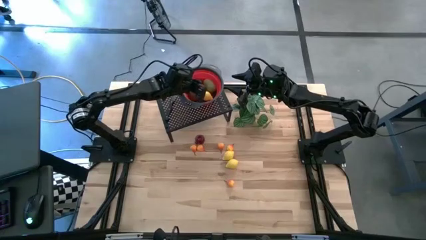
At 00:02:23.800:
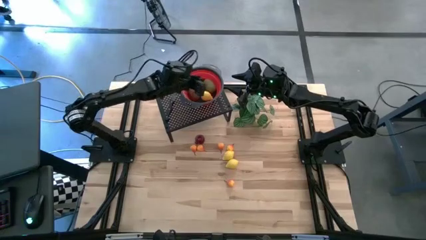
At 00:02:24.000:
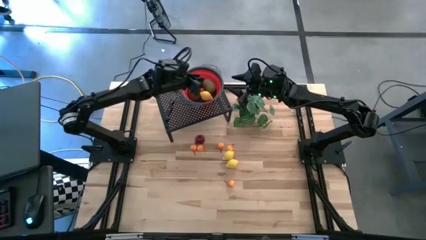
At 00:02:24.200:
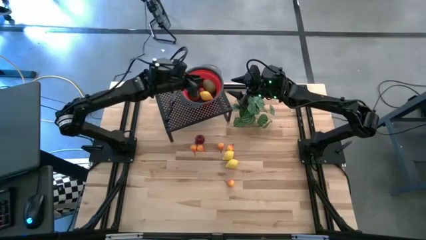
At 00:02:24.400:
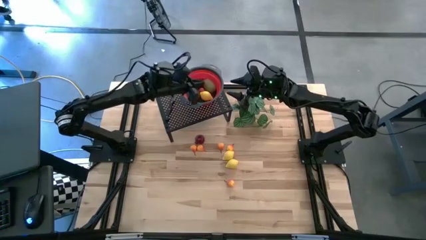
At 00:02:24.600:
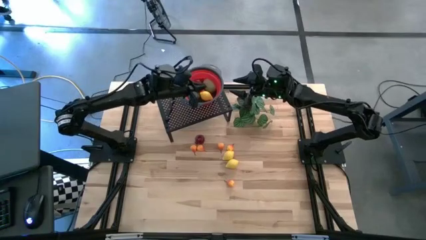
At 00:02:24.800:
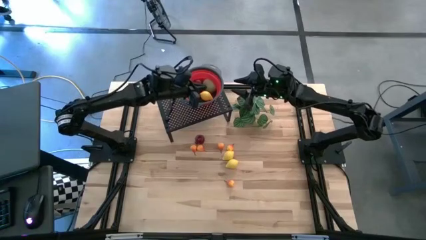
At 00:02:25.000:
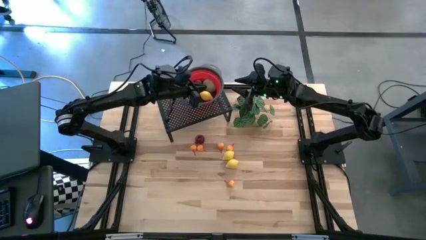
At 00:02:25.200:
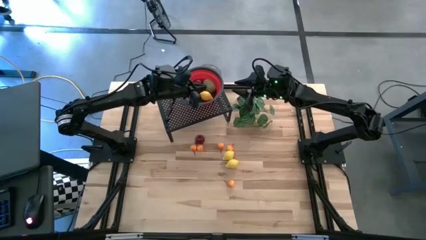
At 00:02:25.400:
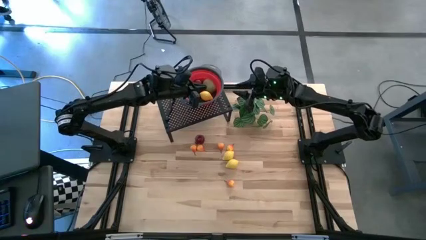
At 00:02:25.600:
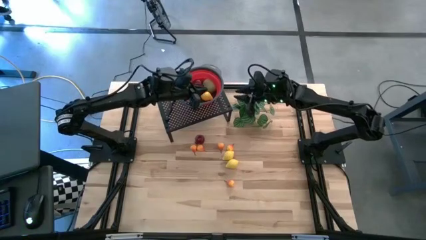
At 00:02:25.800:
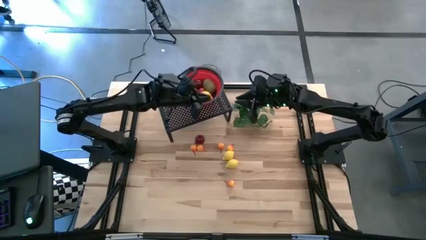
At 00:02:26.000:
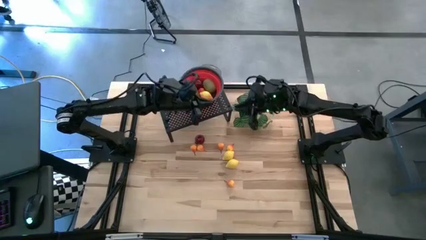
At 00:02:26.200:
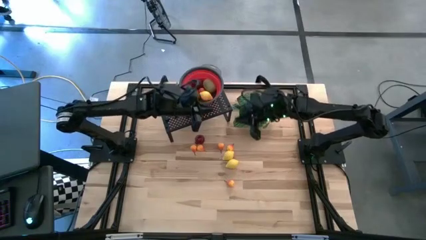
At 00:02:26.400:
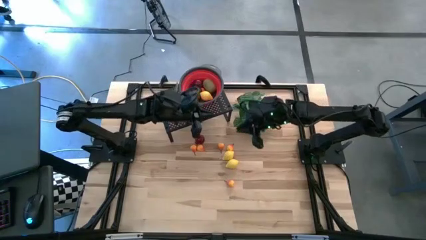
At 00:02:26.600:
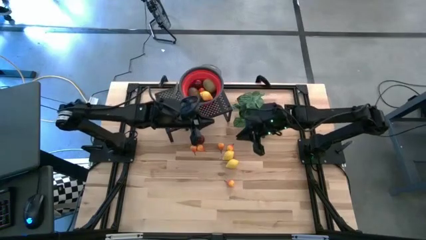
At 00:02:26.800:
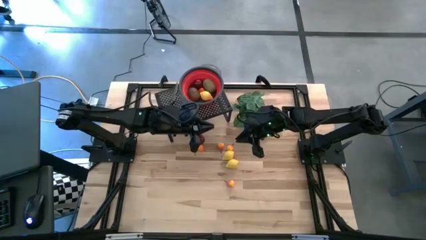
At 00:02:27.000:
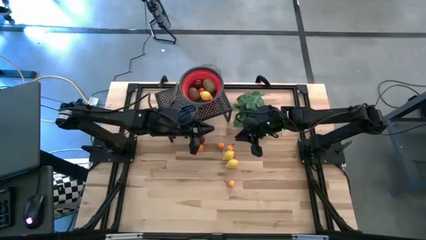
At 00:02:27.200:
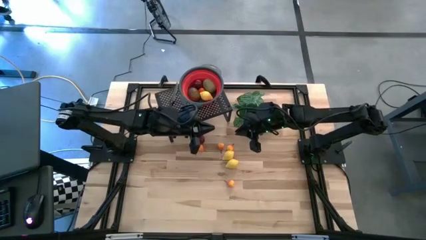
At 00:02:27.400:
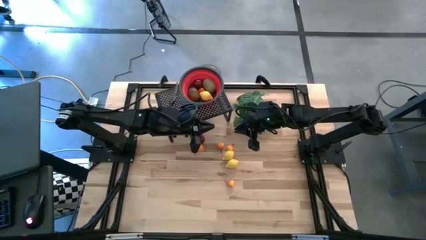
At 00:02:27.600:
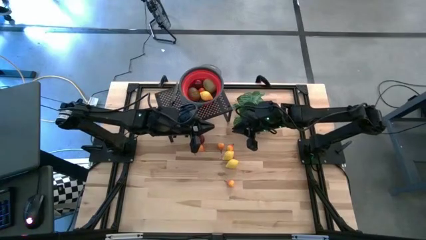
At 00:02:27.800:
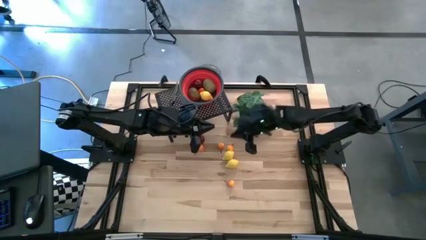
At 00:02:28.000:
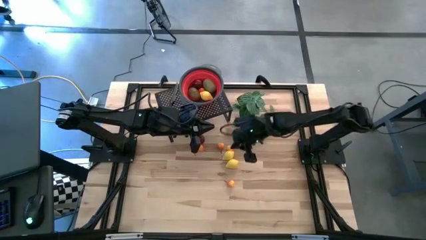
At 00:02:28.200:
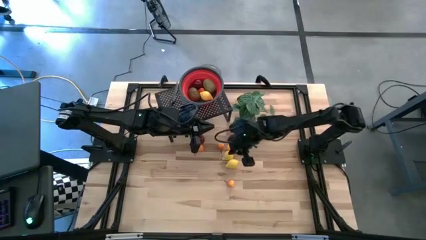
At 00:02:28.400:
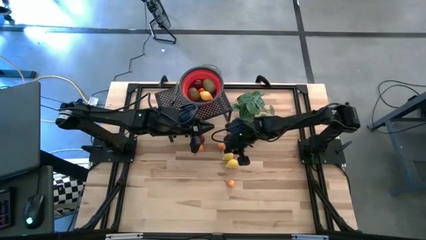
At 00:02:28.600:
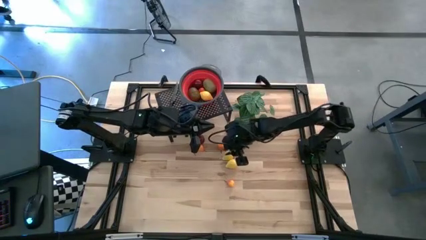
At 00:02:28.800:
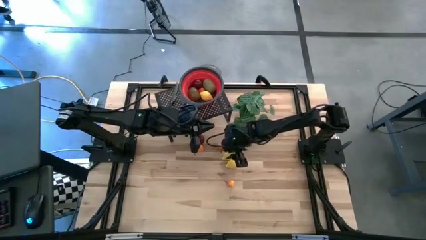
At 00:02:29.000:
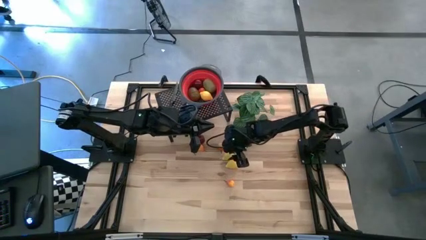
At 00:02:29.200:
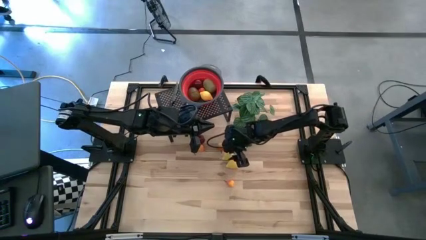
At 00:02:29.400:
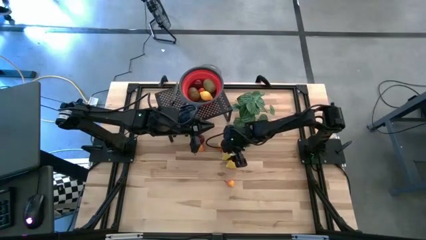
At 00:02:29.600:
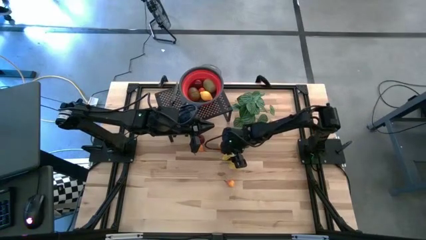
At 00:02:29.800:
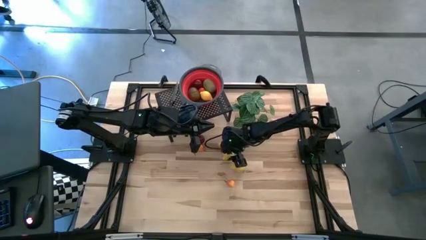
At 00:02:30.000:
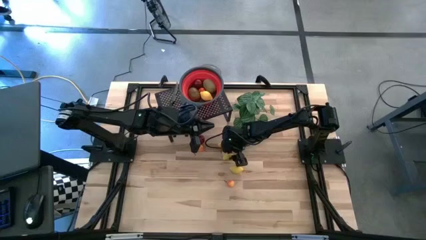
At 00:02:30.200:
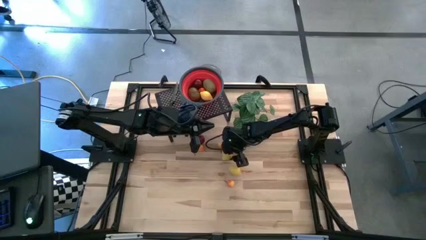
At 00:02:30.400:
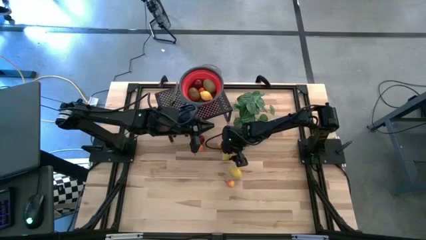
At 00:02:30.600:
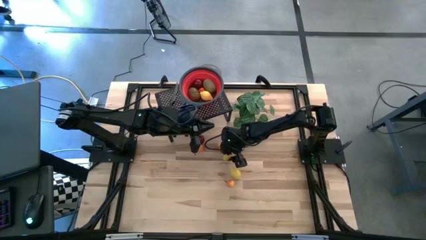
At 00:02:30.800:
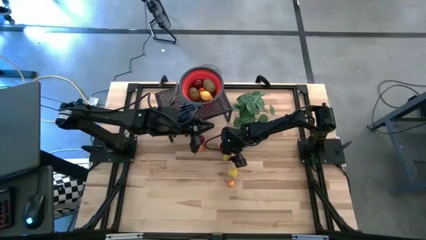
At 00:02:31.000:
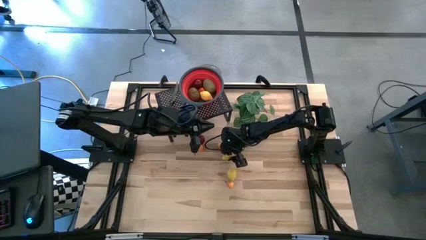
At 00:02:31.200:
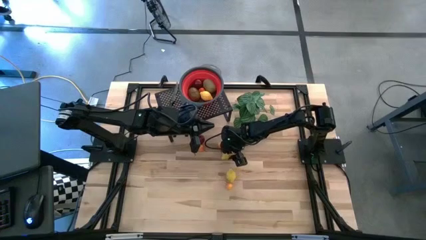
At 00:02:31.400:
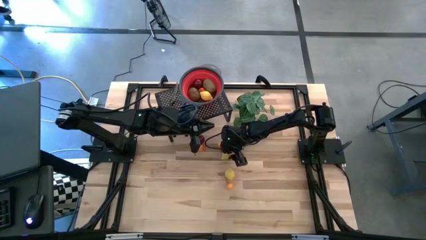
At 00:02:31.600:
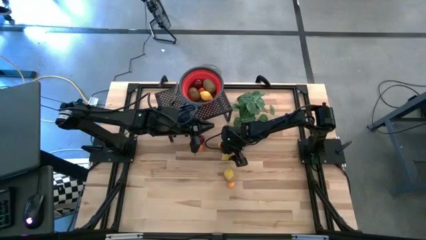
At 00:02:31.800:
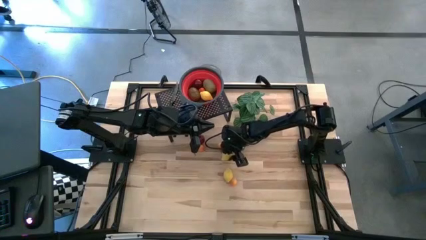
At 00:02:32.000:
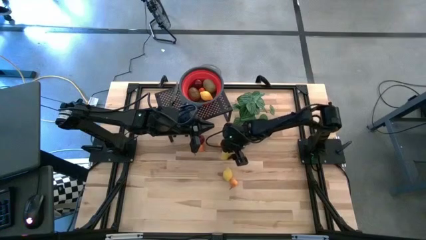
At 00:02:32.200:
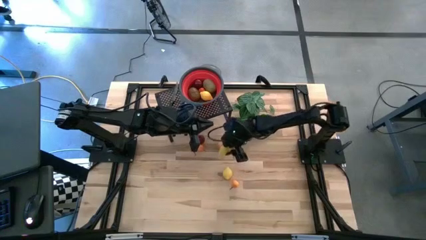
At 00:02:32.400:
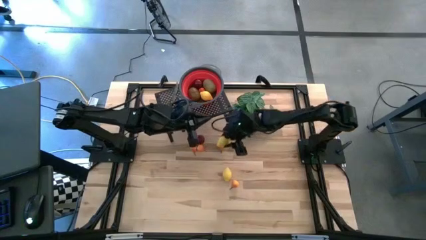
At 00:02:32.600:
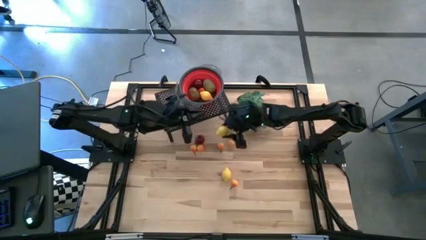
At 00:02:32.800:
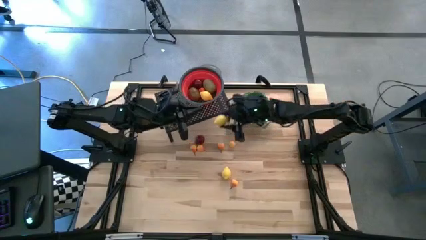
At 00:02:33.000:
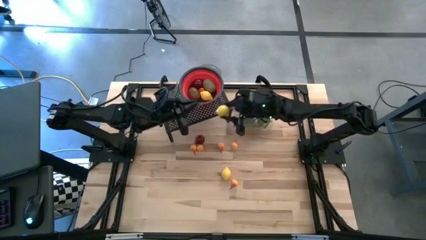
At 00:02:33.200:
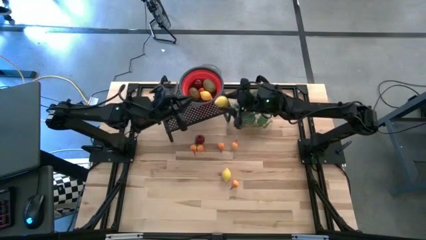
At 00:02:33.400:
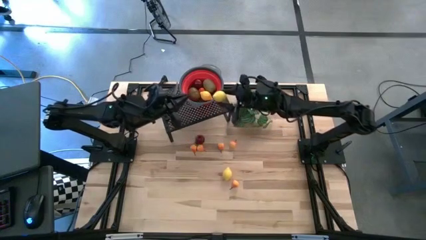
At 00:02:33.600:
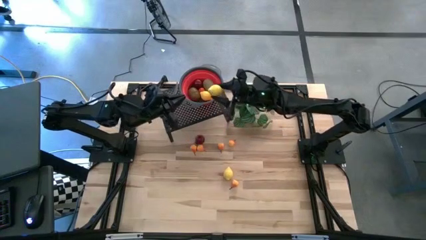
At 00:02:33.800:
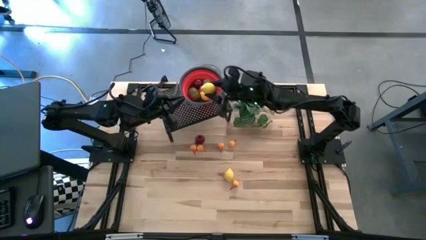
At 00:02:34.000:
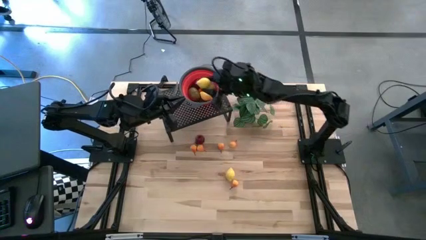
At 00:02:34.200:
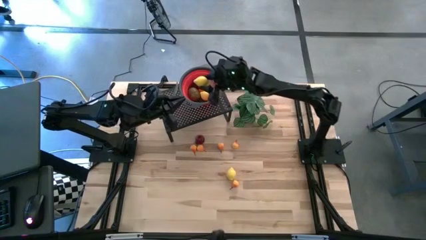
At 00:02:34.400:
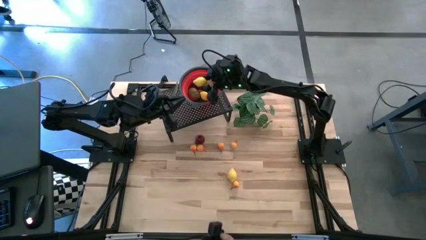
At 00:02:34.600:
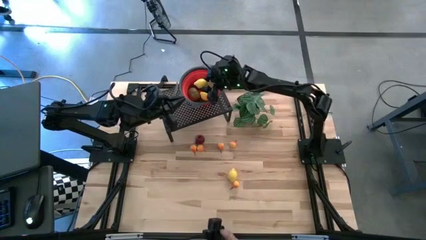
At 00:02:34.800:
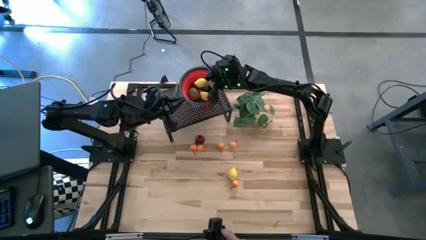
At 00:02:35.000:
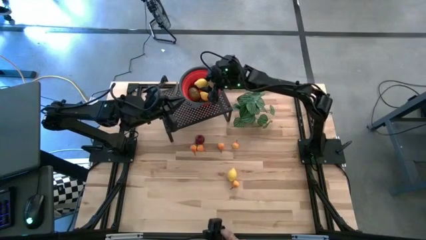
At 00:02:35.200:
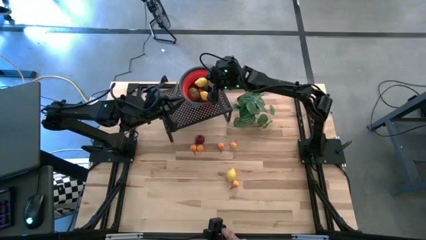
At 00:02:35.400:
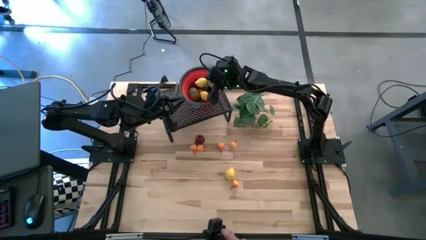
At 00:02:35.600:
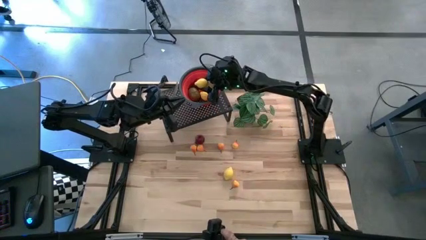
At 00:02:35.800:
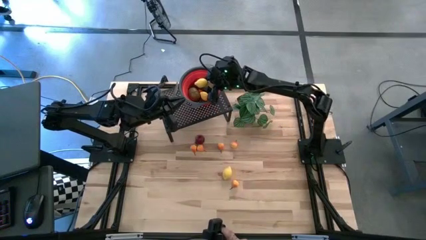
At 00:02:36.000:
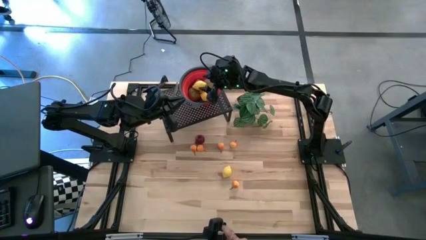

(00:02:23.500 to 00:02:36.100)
Task: Pick & Place Fruit
Put the top yellow lemon into the red basket on the shelf
